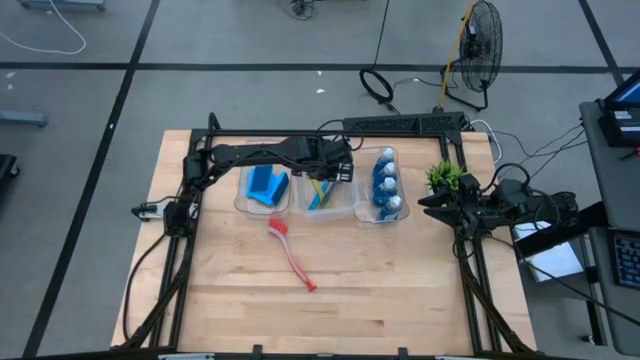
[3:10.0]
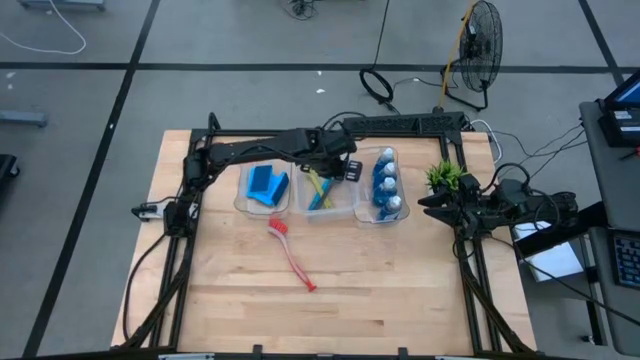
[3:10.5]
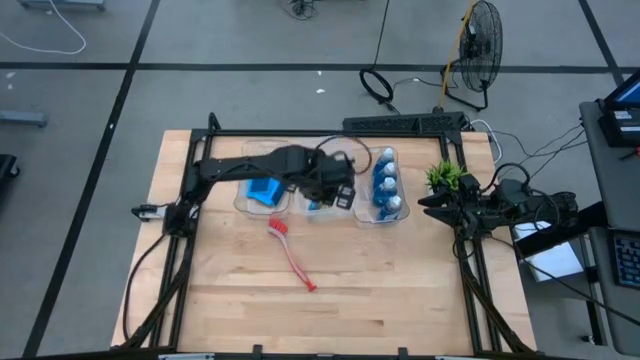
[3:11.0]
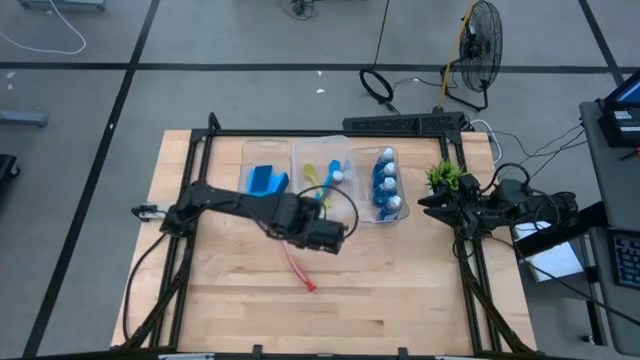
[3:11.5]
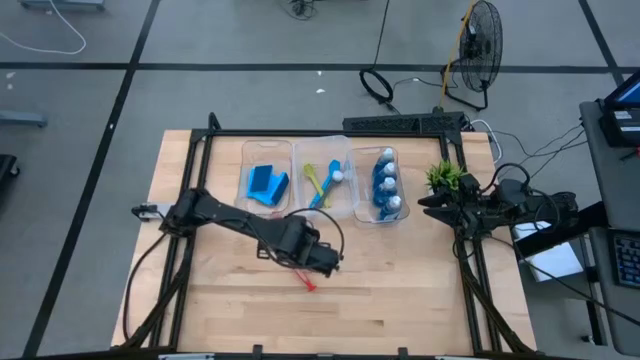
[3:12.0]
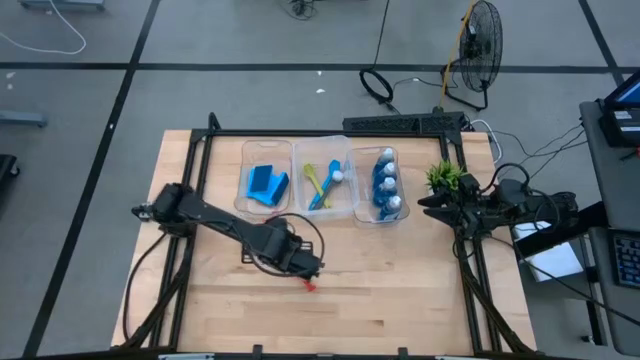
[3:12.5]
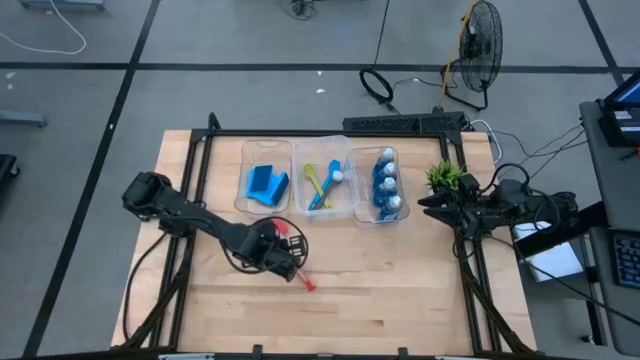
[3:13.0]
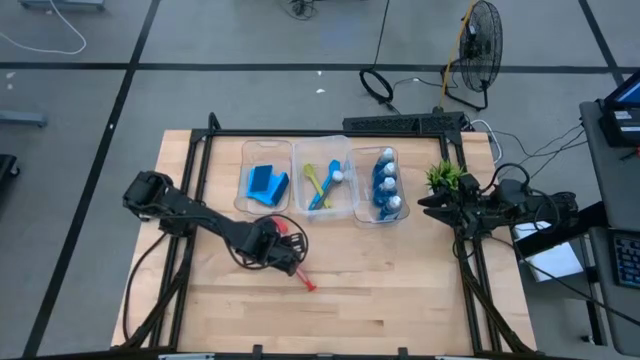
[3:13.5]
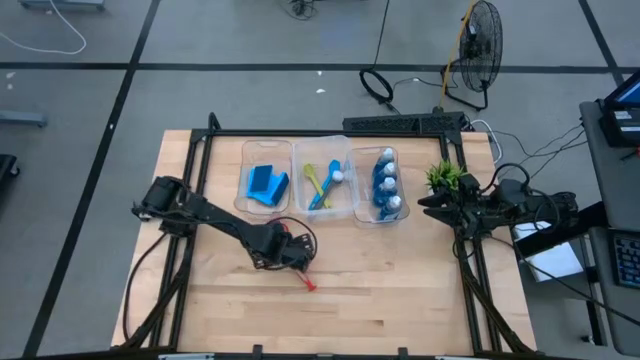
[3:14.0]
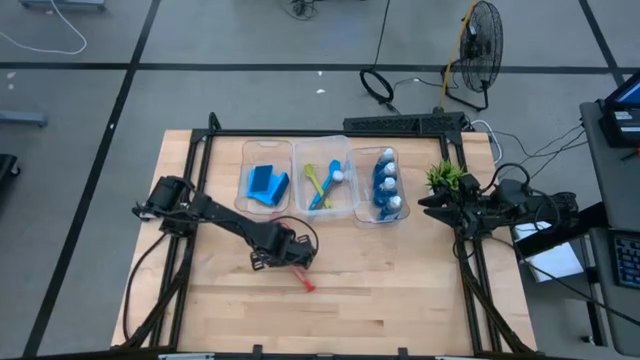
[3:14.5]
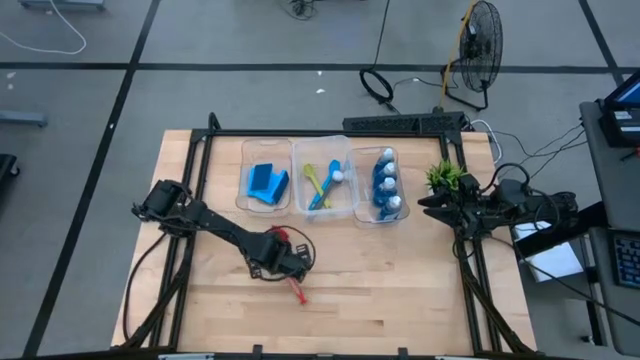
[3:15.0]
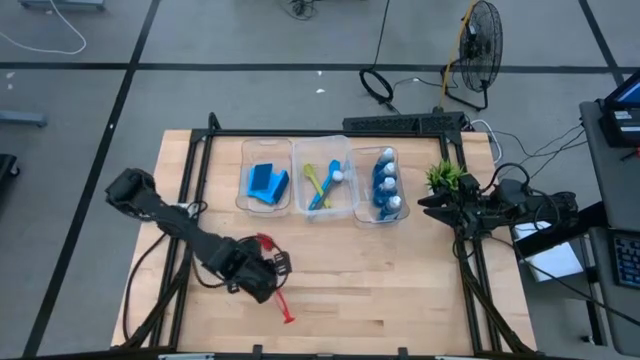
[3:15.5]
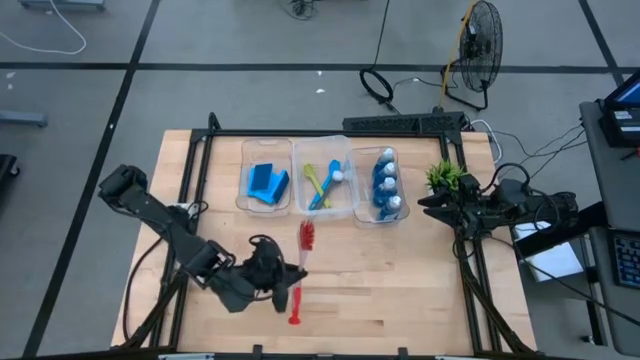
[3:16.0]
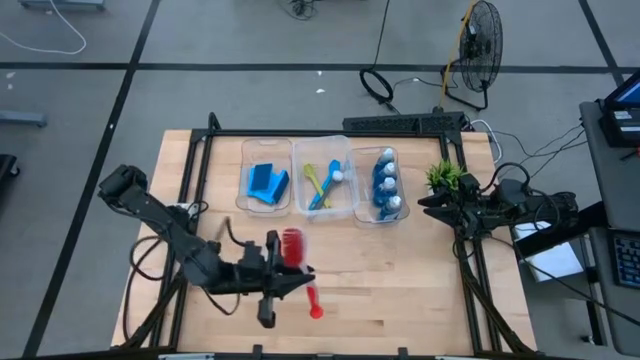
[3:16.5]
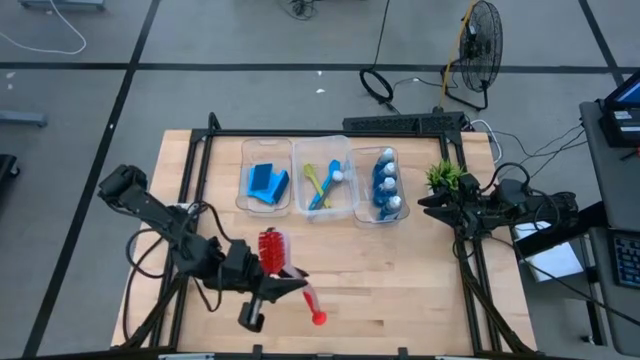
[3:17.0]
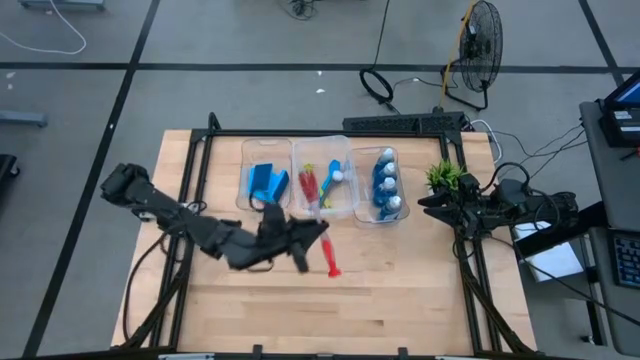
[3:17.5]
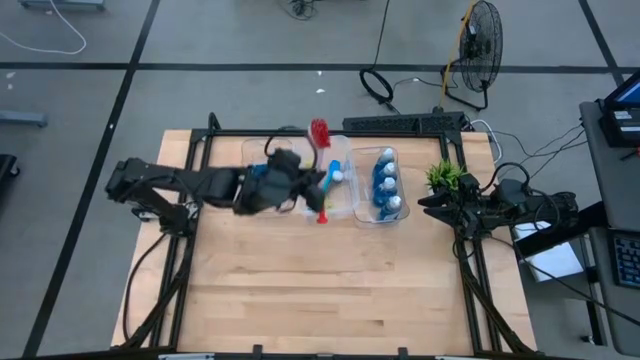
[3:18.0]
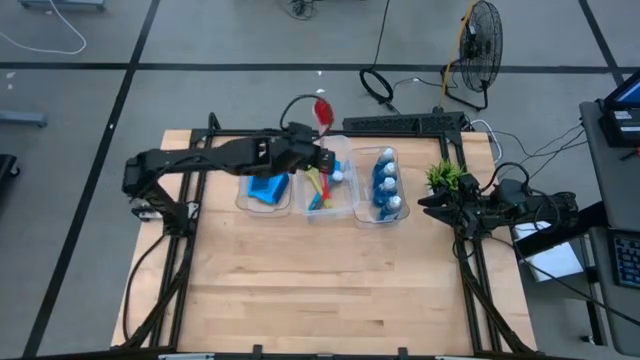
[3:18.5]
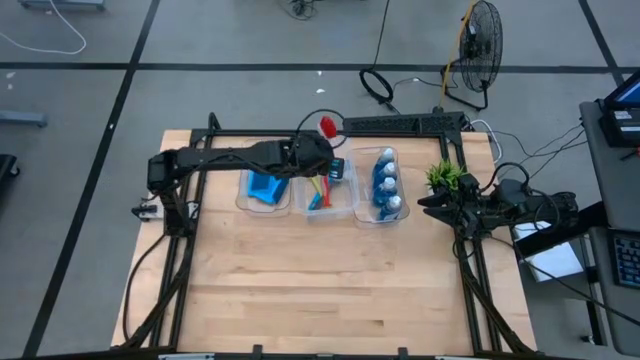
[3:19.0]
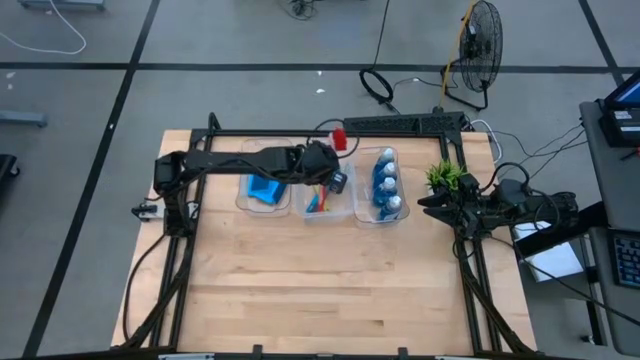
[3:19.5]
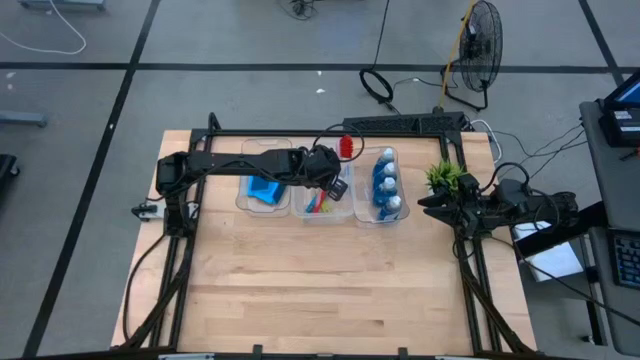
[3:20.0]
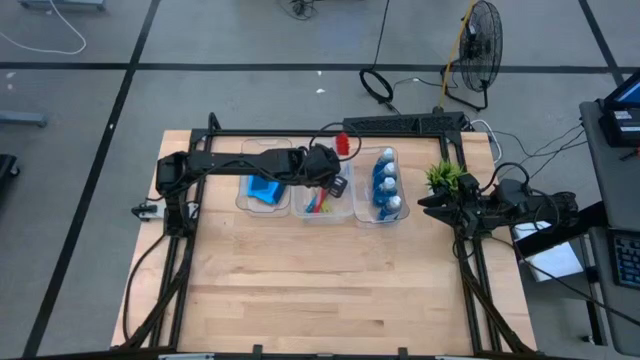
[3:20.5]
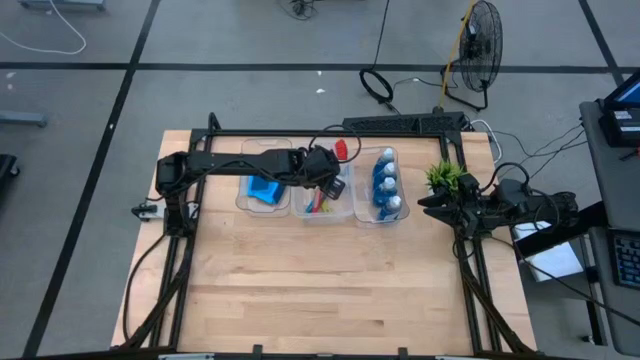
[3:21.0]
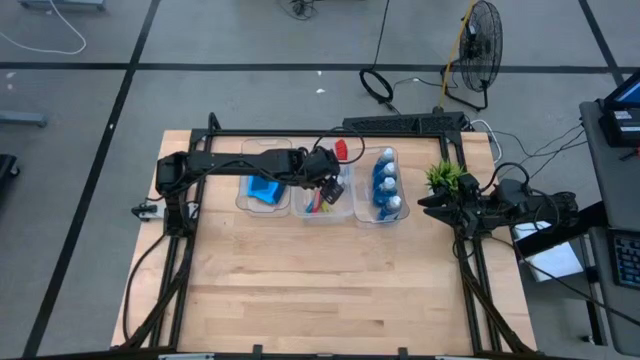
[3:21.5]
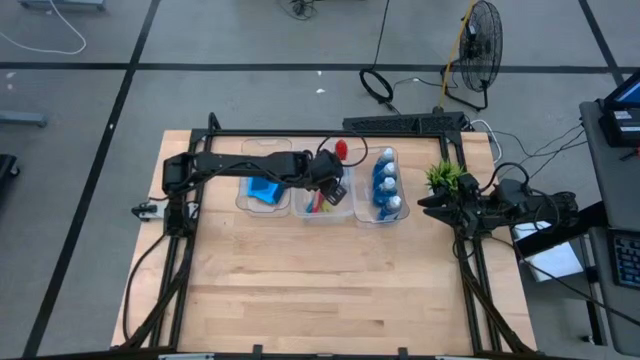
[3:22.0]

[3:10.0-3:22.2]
Task: Pick & Place Kitchen Sink Supplies
Put the red dish brush into the white bin

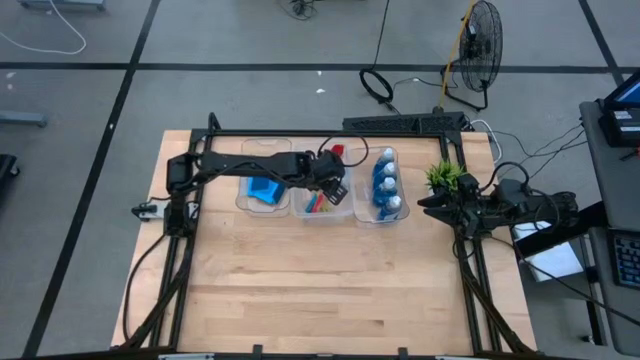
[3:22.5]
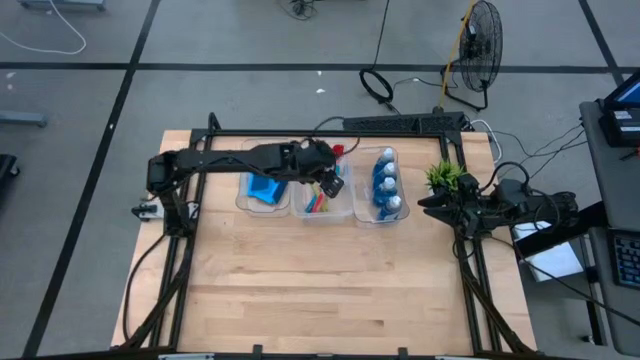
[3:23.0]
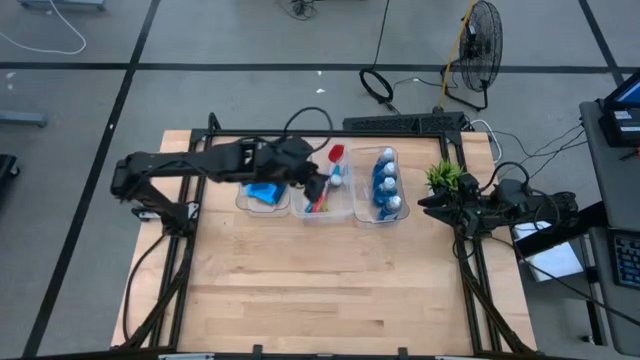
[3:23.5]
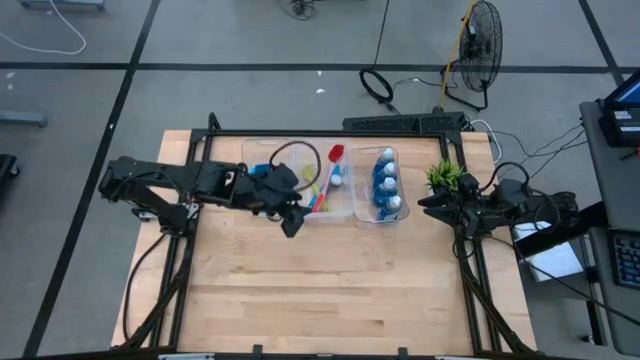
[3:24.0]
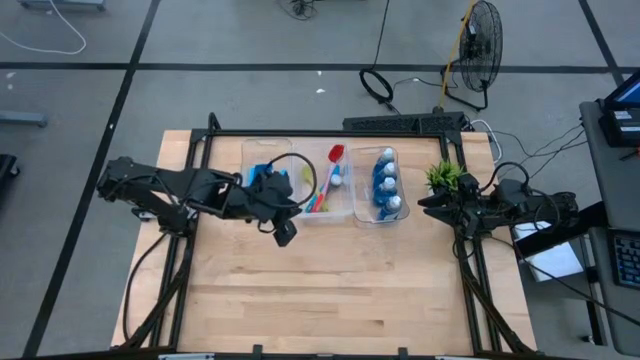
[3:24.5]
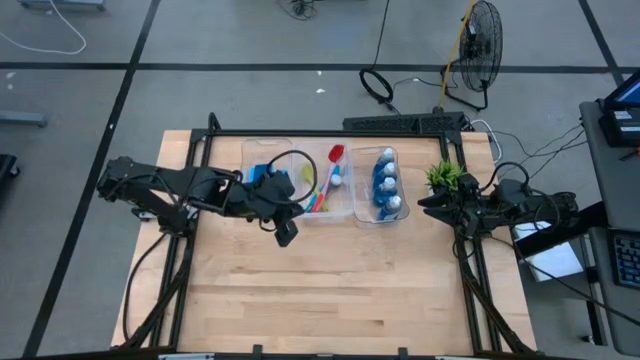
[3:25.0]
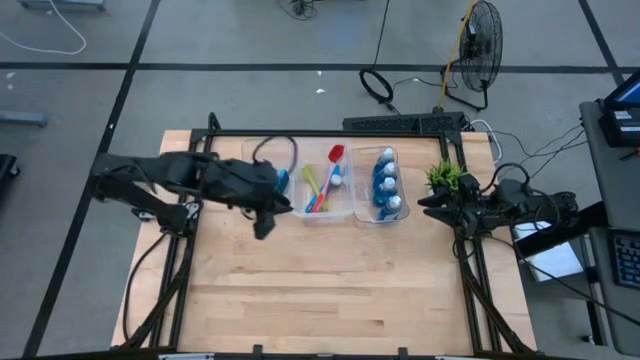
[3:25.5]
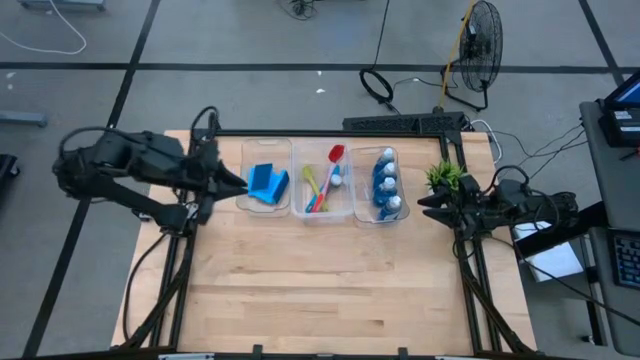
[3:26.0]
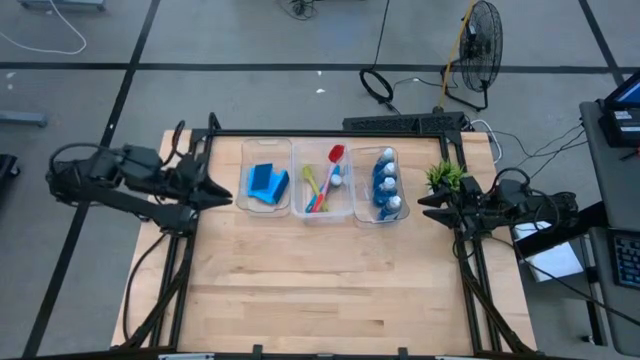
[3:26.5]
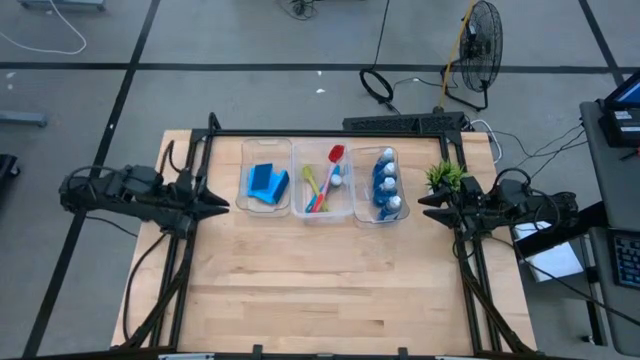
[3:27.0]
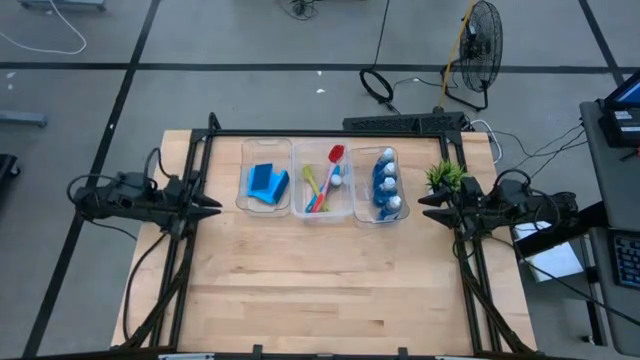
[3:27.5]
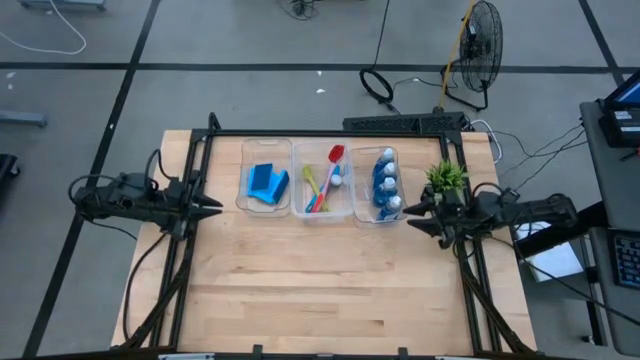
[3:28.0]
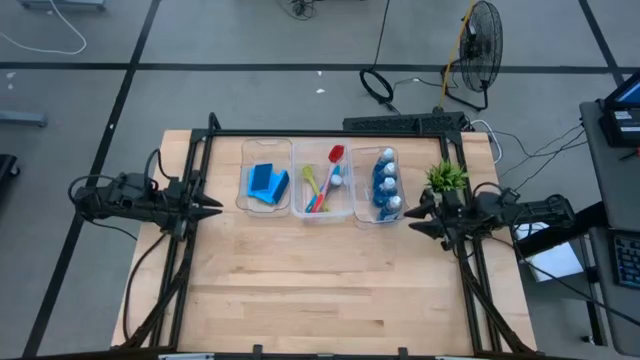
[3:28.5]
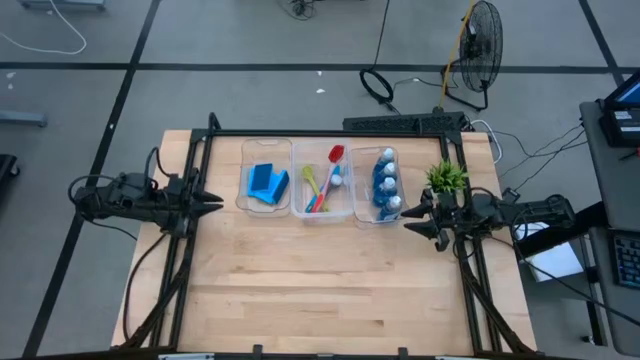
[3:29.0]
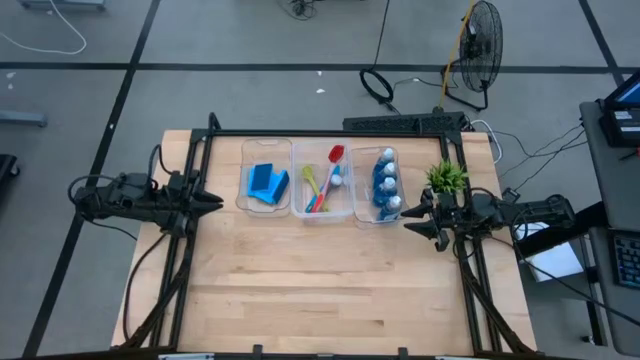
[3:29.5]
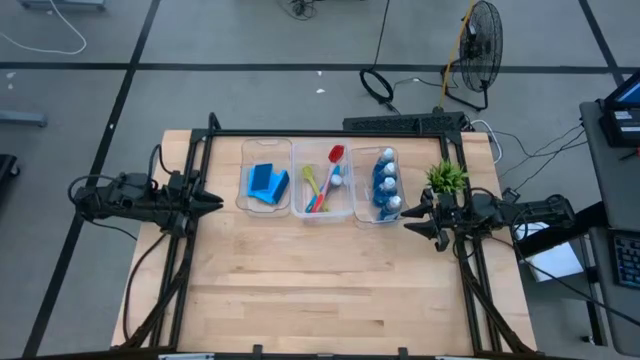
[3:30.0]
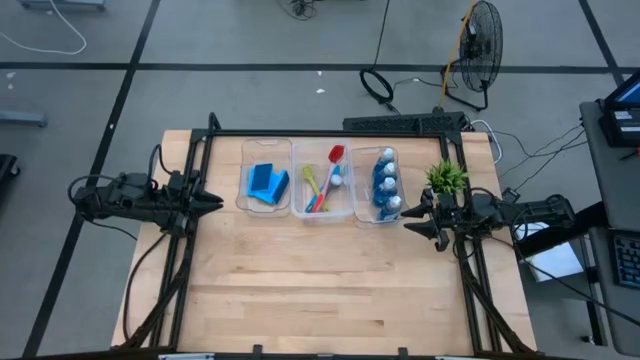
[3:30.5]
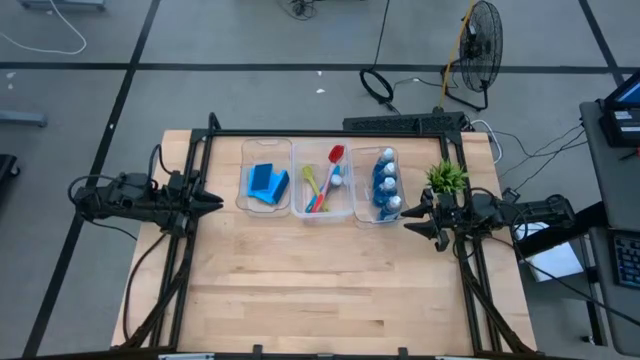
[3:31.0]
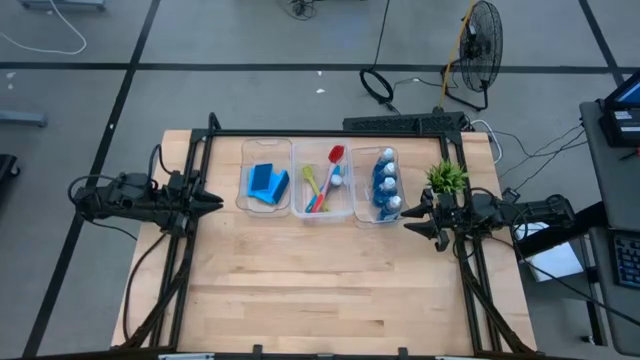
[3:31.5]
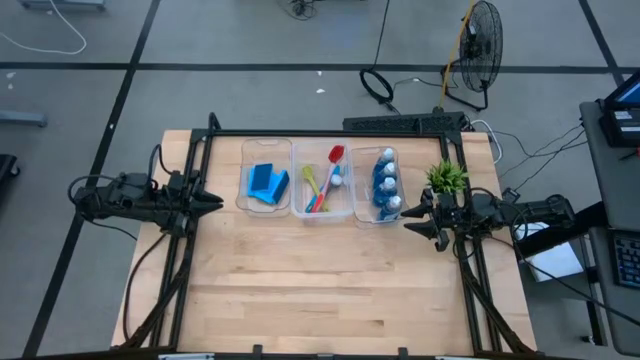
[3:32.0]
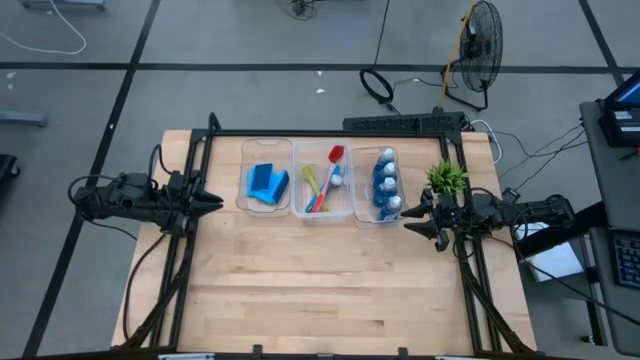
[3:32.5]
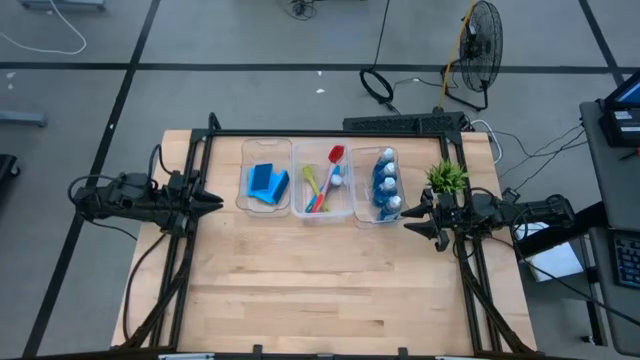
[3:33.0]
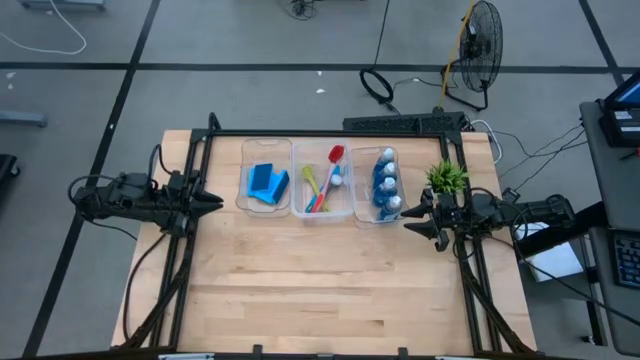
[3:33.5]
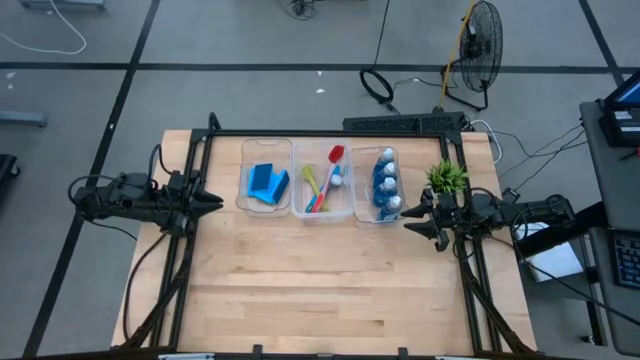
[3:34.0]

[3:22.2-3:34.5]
Return to Home Position
